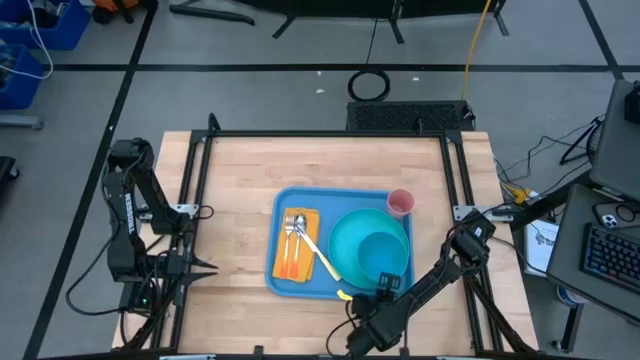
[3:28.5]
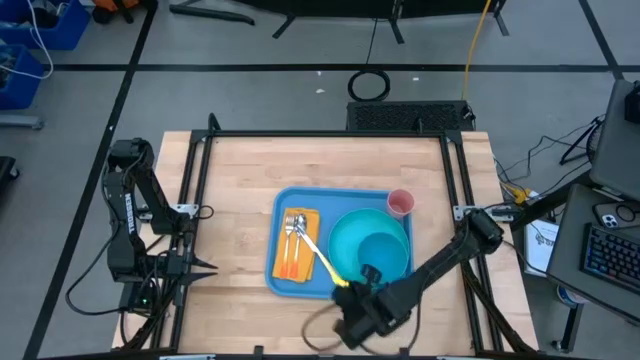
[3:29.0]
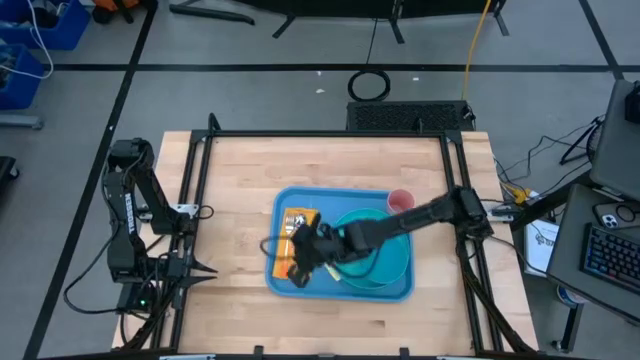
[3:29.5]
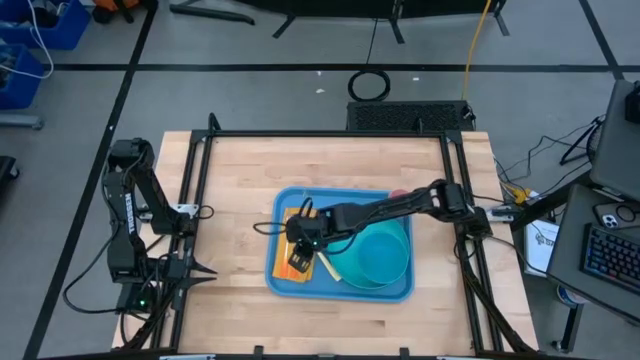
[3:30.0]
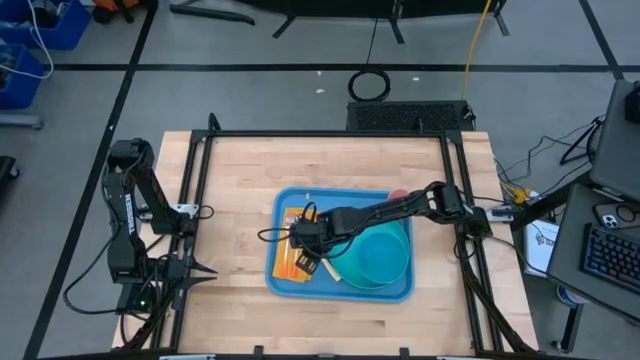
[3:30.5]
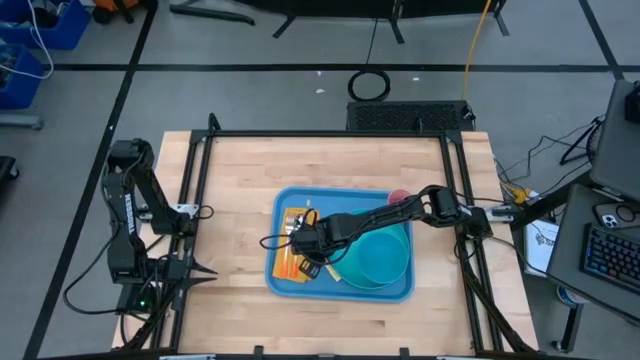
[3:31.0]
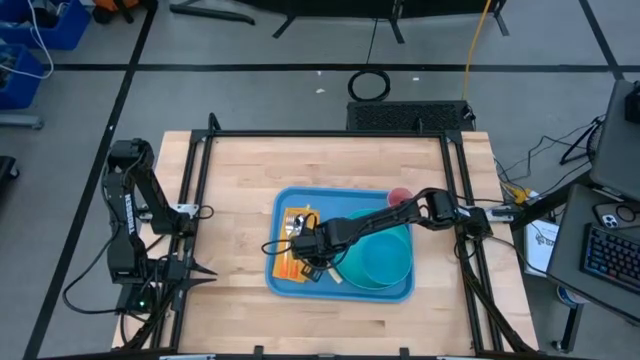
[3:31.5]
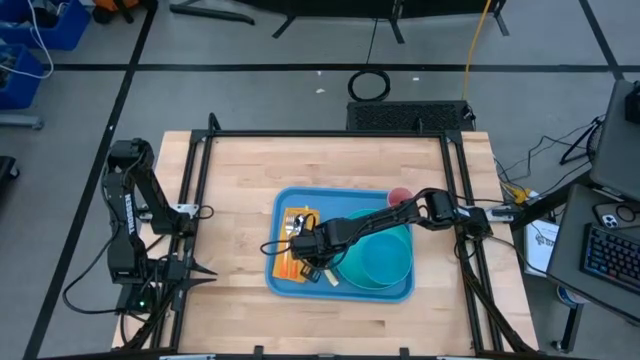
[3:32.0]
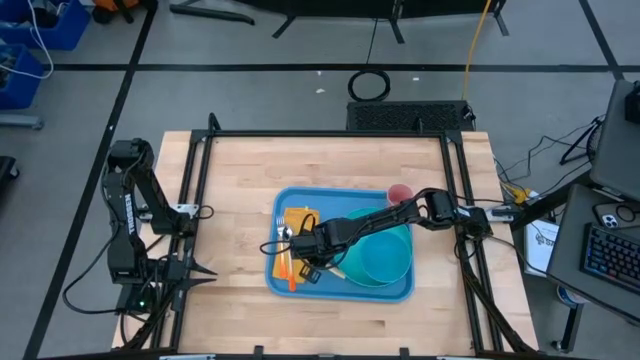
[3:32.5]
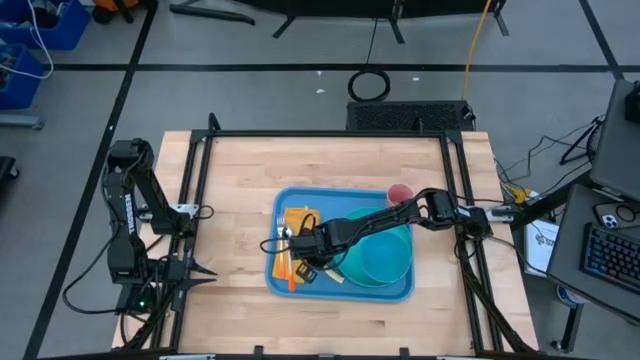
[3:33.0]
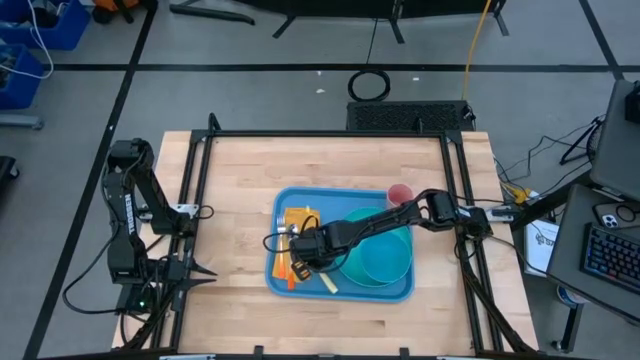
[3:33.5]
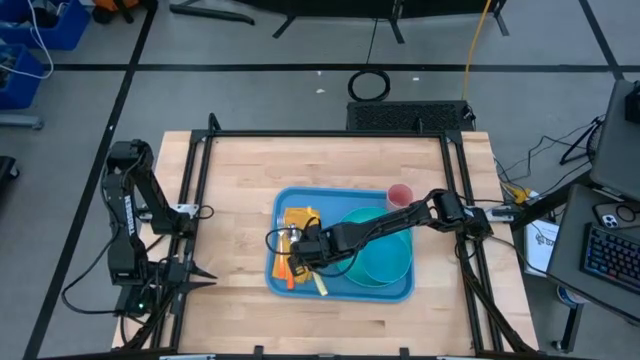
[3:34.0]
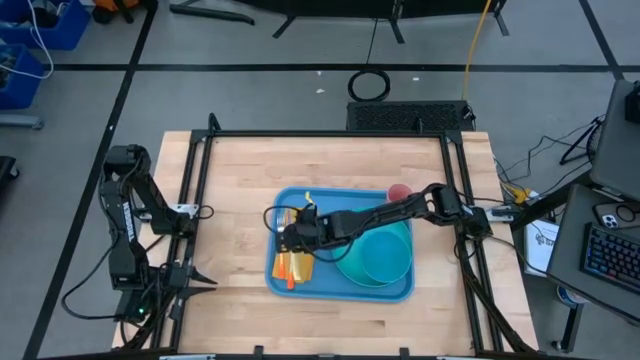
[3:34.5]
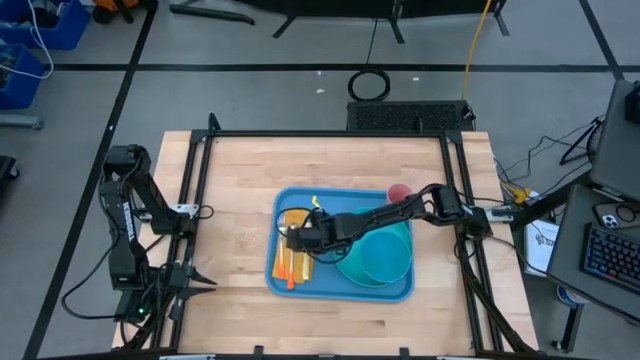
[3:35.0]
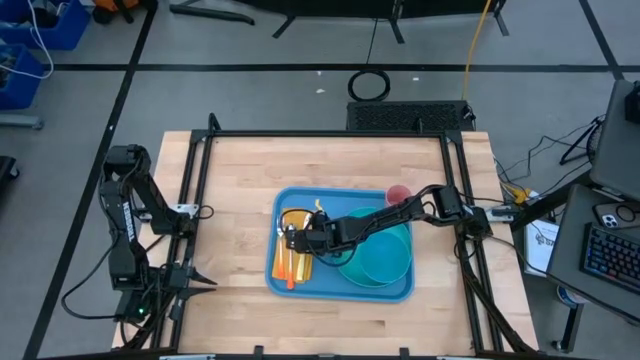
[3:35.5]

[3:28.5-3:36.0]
Task: Set up tray
Put the yellow knife on the yellow napkin to the right of the orange spoon on the blue serving tray

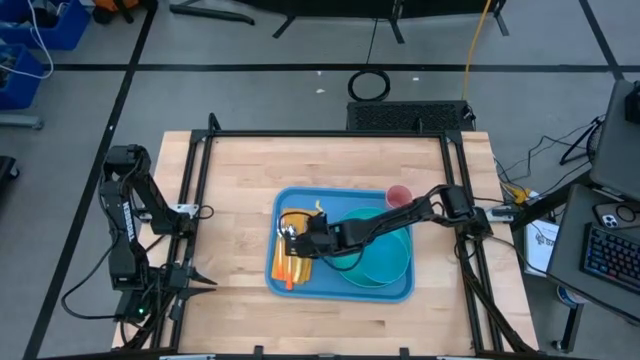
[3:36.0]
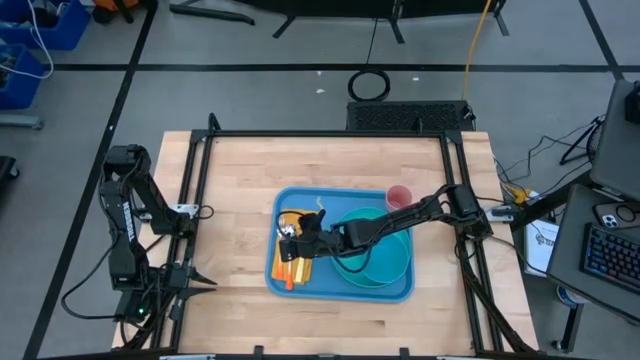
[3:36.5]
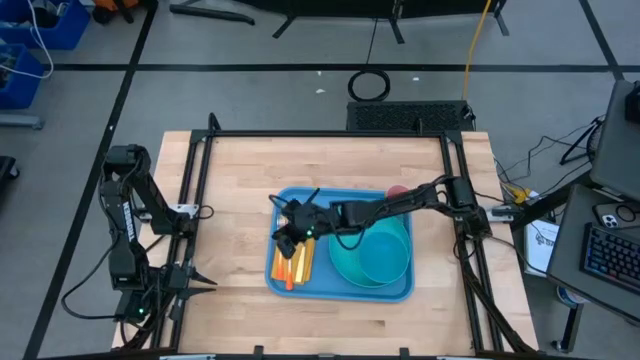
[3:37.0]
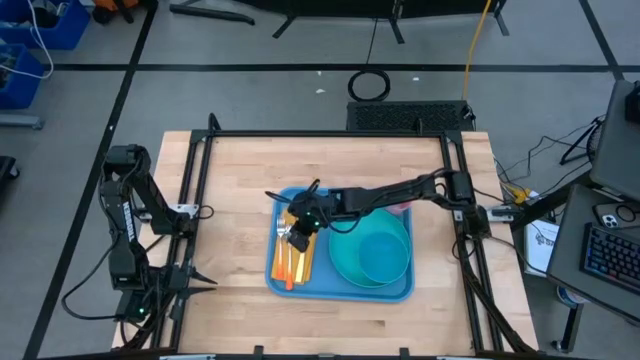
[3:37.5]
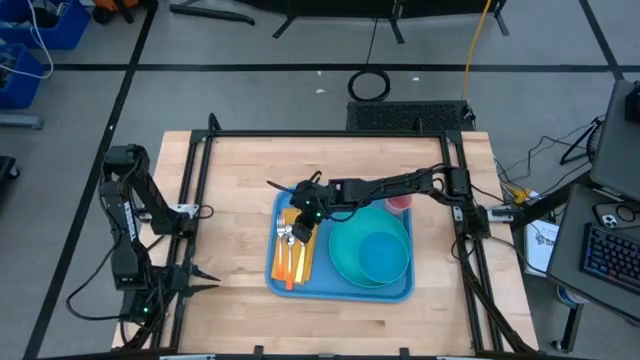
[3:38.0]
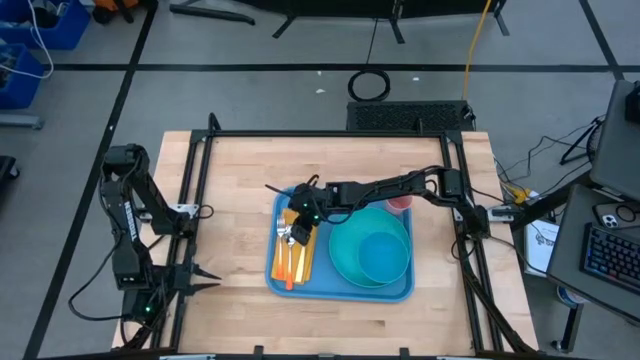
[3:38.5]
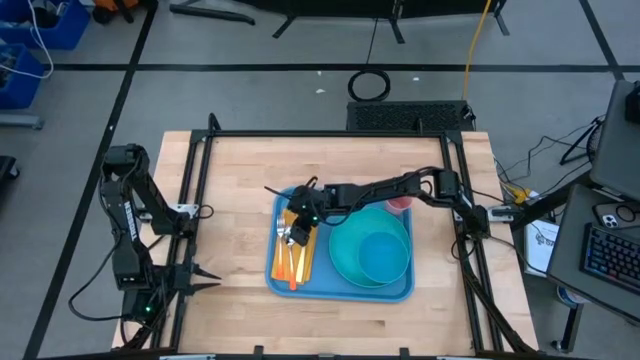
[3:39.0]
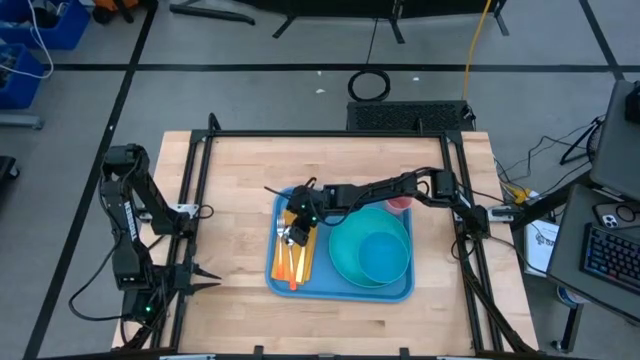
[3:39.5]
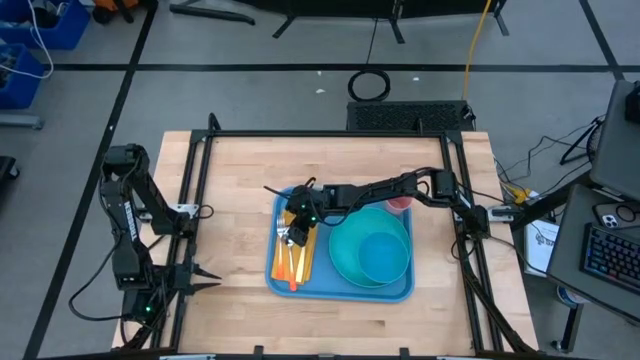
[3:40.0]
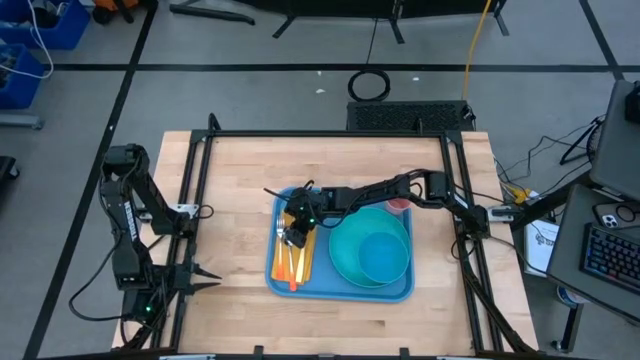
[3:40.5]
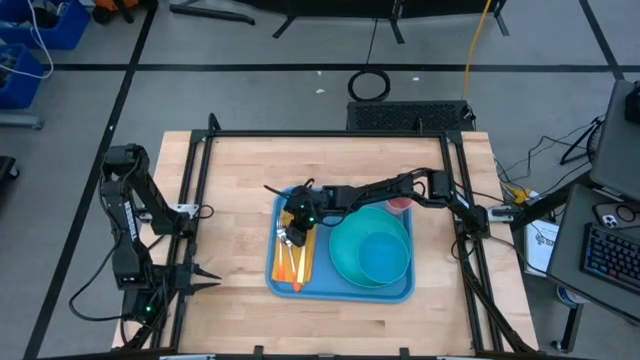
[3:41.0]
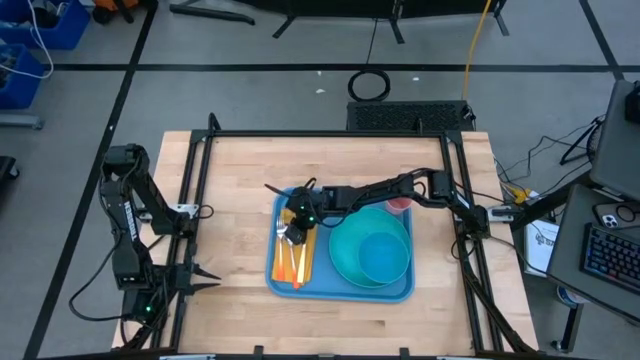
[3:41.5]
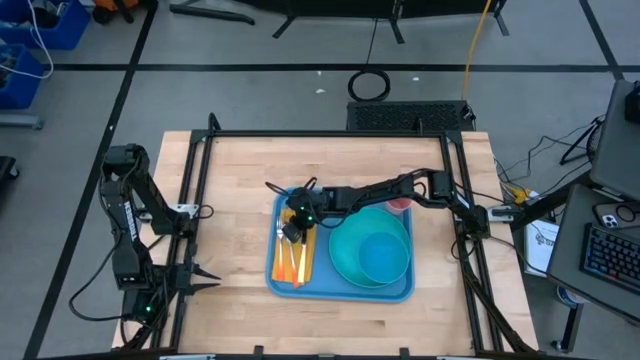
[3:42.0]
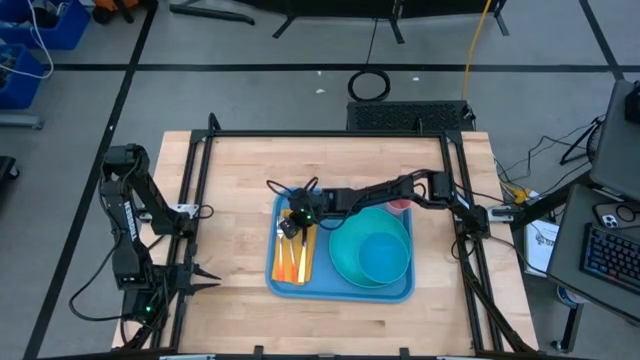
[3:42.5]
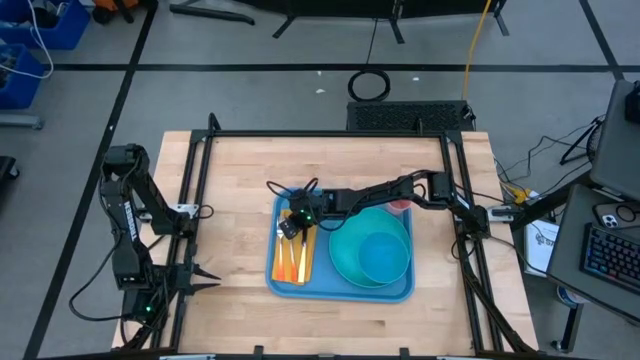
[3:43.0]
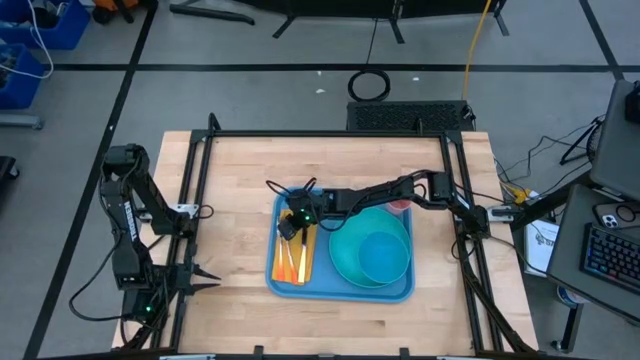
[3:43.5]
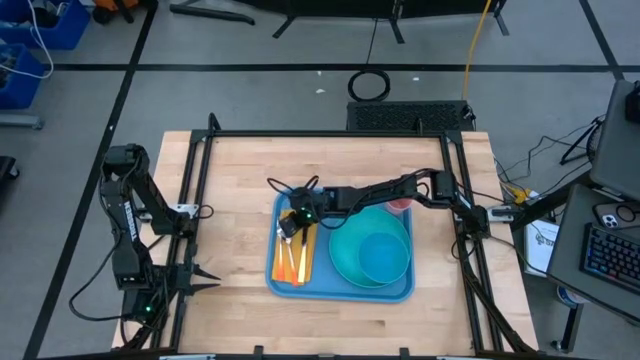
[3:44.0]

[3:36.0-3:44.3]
Adjust the orange spoon on the yellow napkin on the blue serving tray

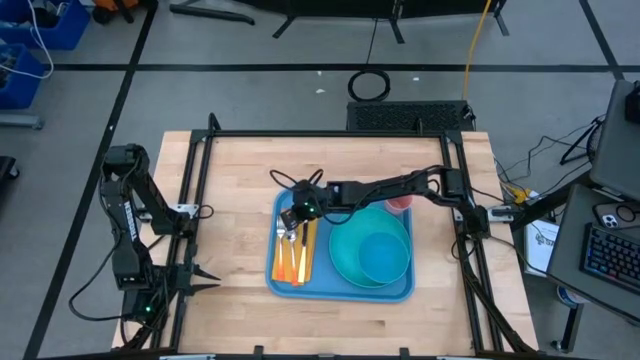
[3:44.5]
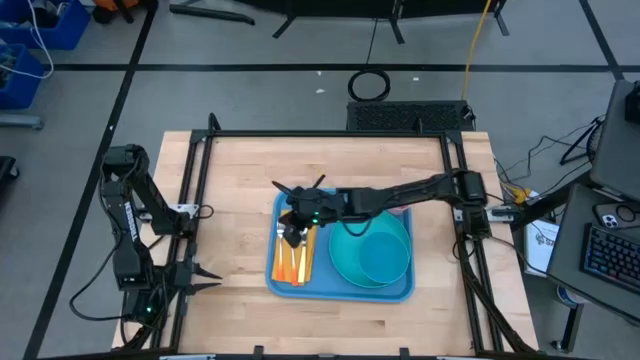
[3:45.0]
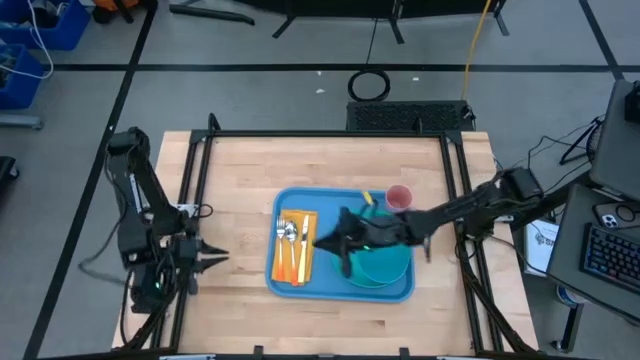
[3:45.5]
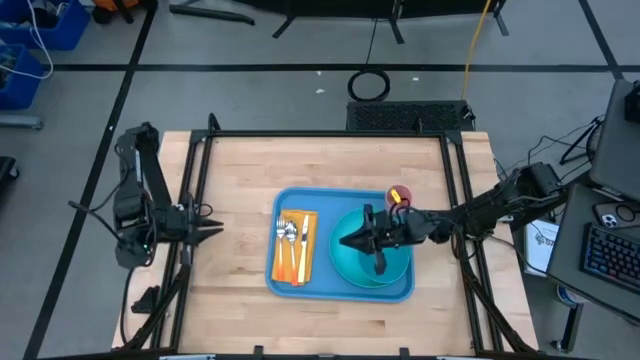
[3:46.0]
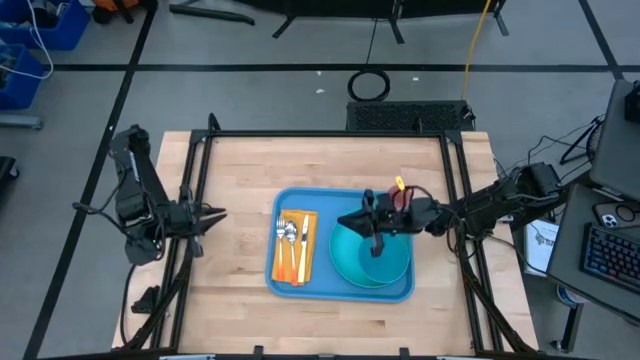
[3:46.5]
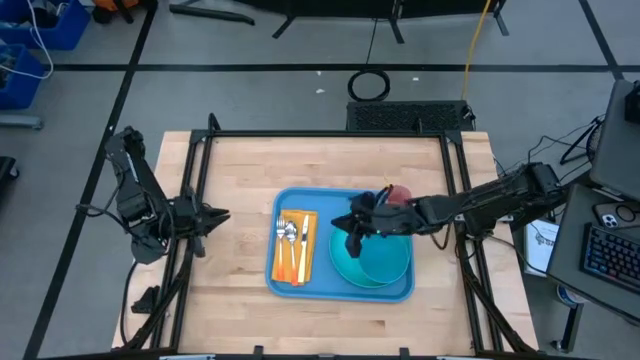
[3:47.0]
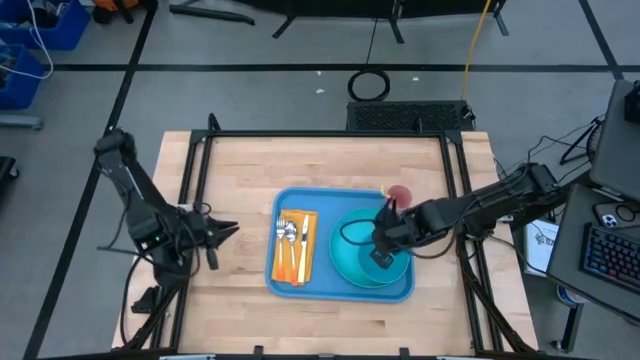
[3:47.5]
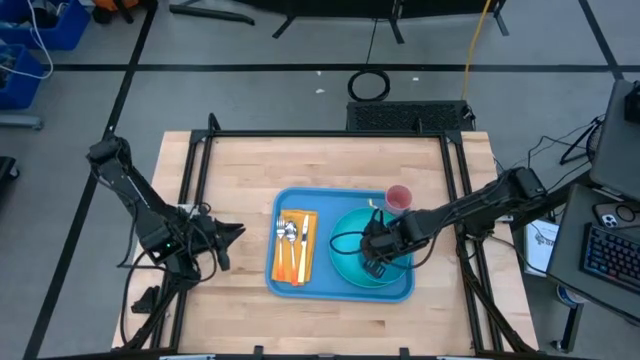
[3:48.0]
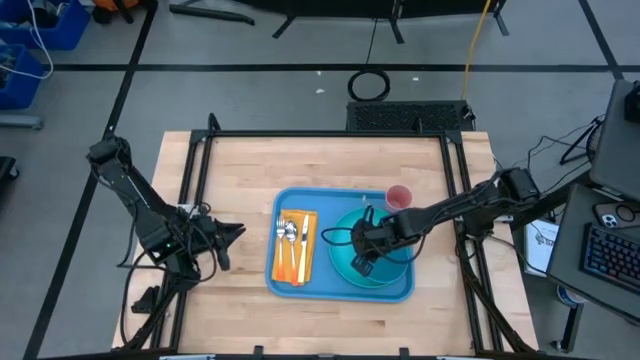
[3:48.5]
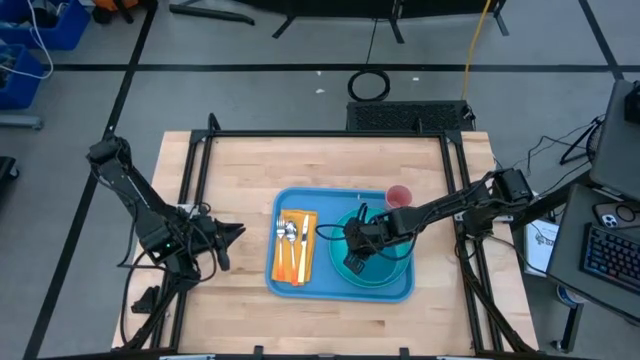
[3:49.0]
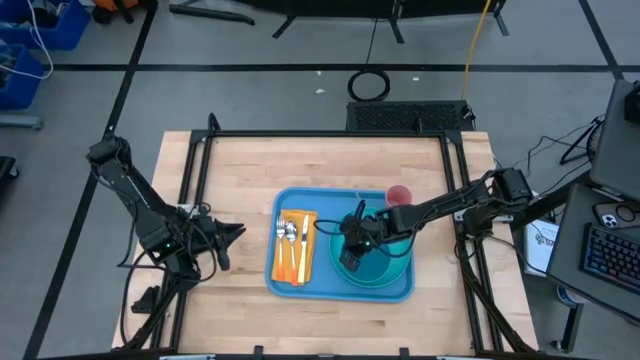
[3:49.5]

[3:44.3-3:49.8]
Adjust the blue bowl on the green plate on the blue serving tray

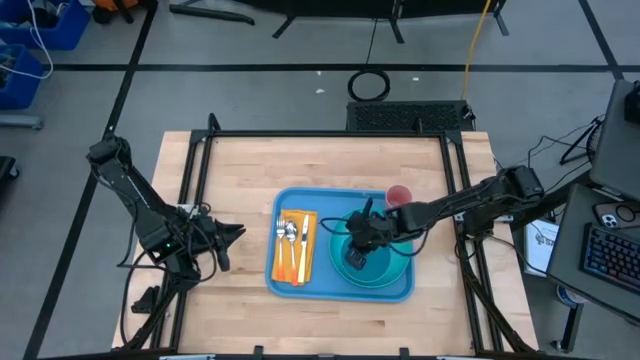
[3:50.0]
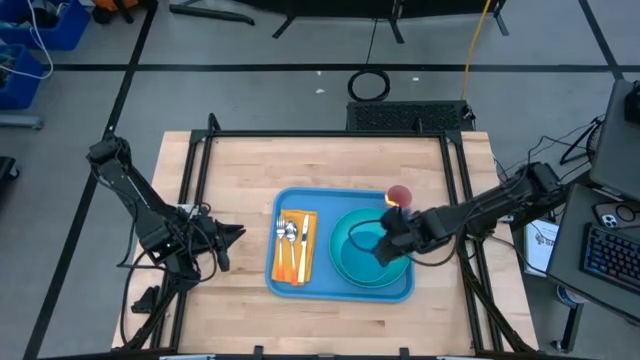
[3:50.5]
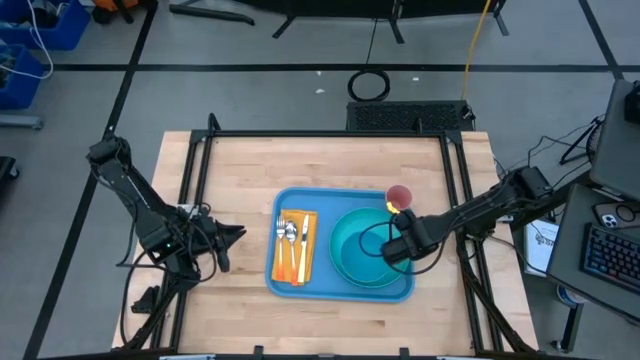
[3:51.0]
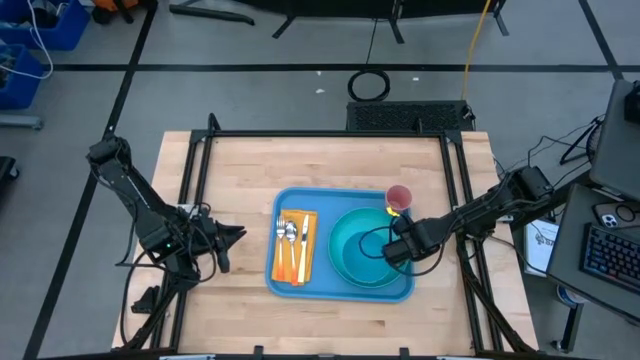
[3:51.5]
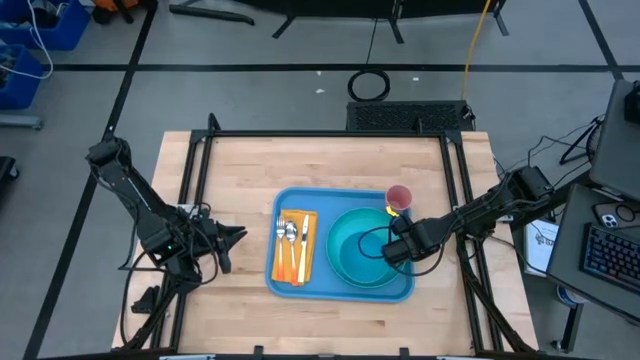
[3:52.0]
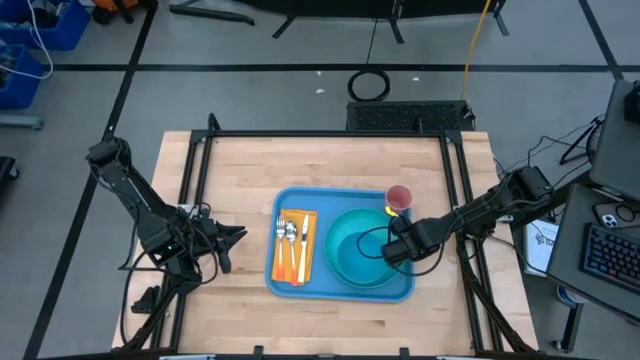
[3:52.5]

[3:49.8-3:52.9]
Adjust the green plate on the blue serving tray
